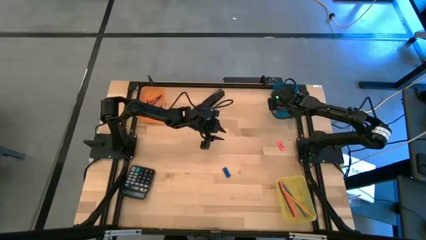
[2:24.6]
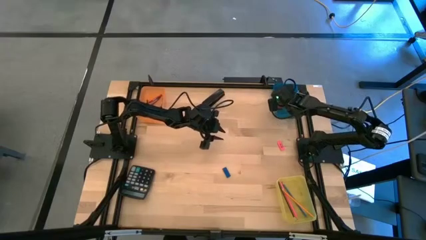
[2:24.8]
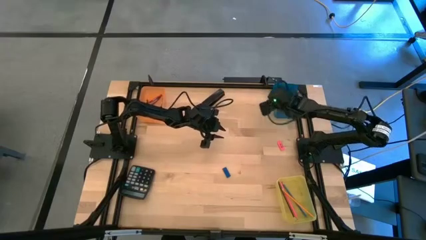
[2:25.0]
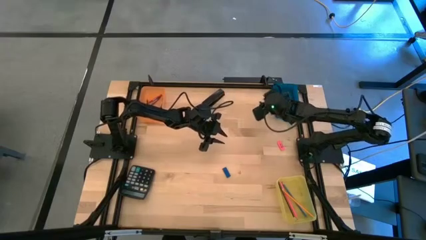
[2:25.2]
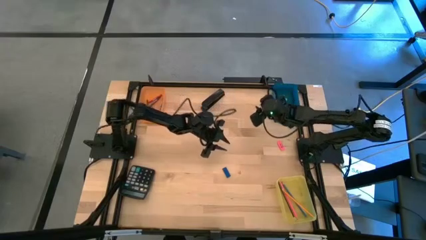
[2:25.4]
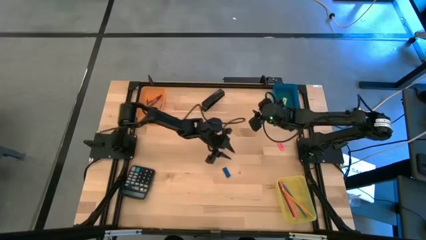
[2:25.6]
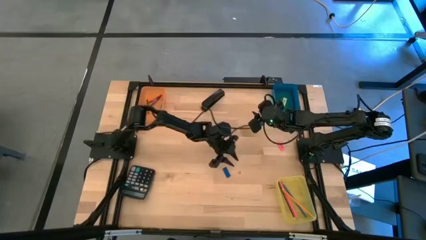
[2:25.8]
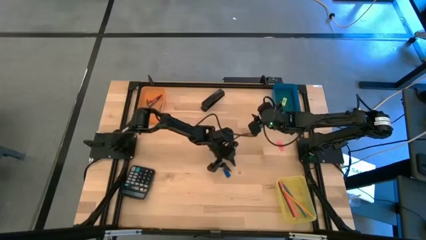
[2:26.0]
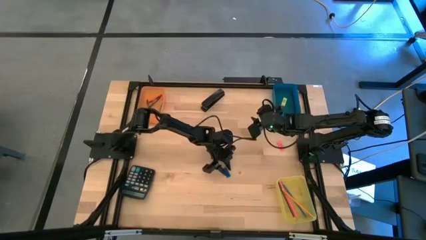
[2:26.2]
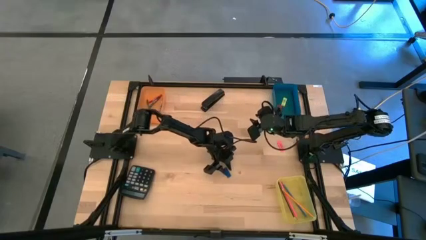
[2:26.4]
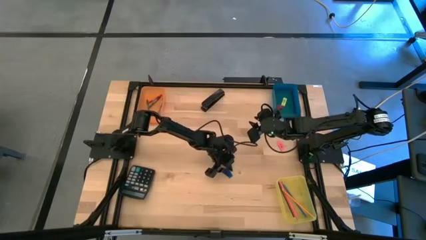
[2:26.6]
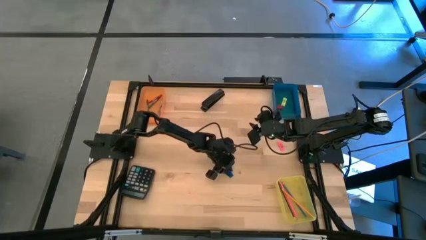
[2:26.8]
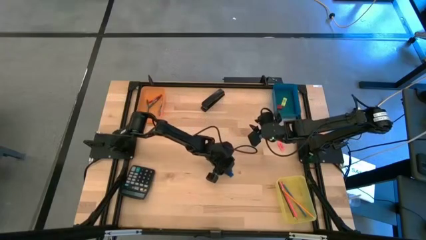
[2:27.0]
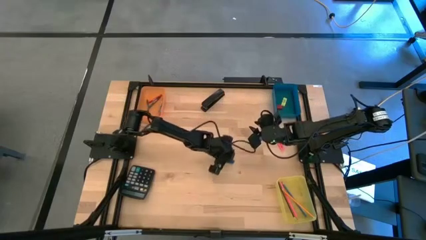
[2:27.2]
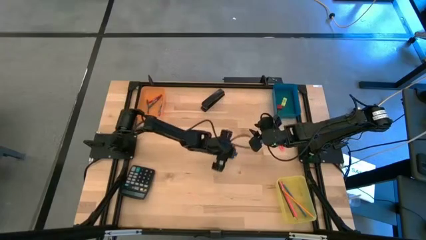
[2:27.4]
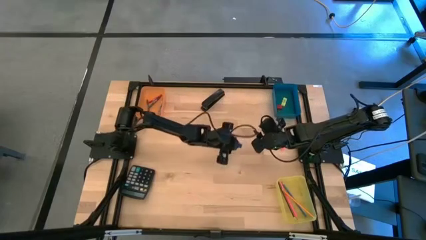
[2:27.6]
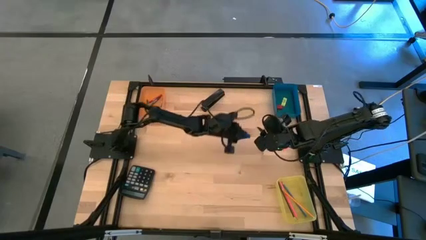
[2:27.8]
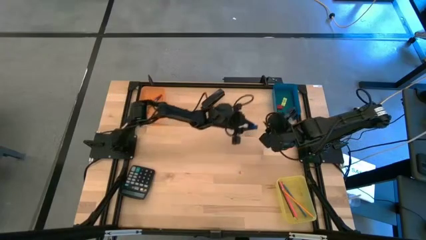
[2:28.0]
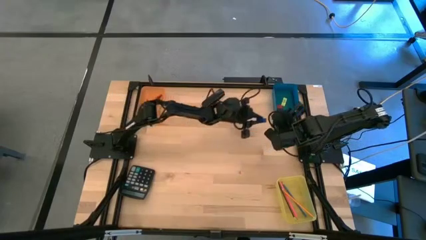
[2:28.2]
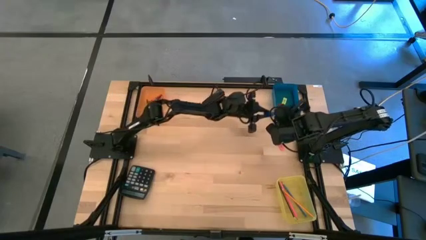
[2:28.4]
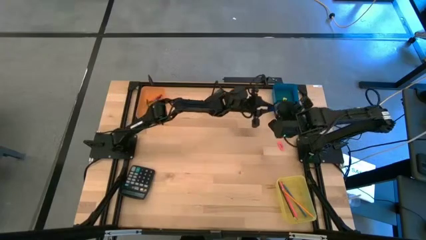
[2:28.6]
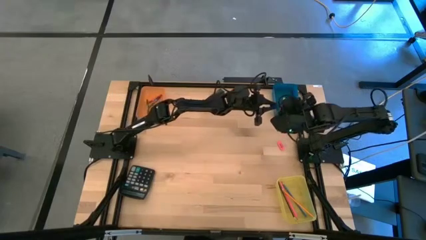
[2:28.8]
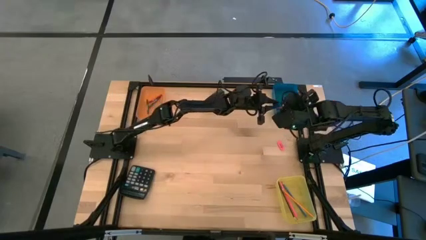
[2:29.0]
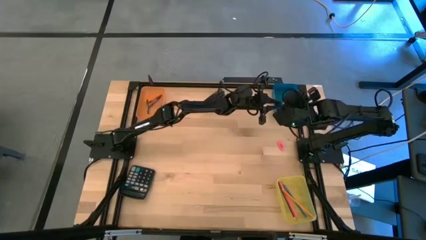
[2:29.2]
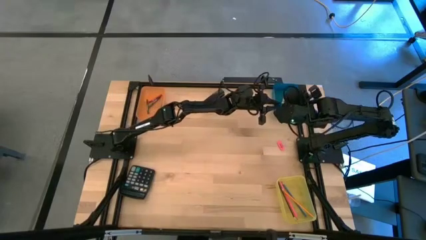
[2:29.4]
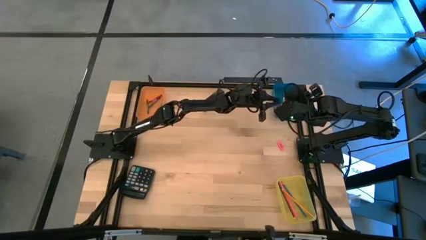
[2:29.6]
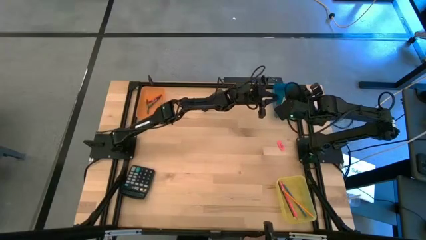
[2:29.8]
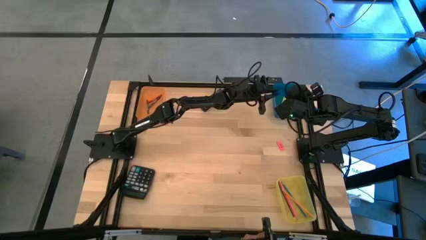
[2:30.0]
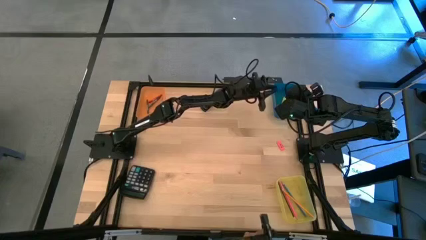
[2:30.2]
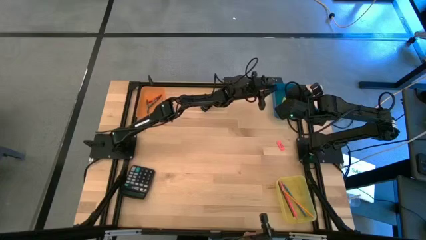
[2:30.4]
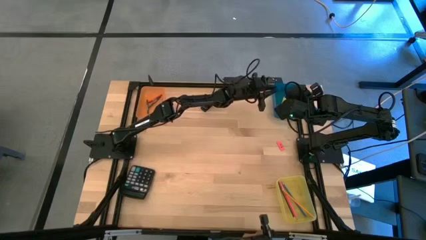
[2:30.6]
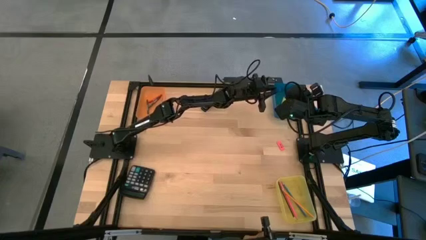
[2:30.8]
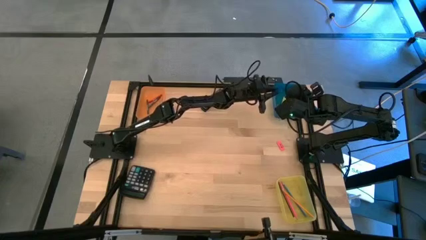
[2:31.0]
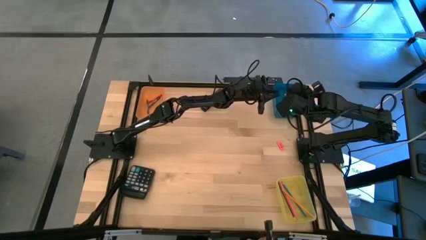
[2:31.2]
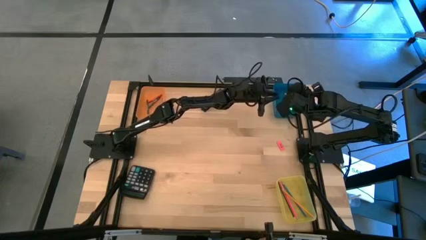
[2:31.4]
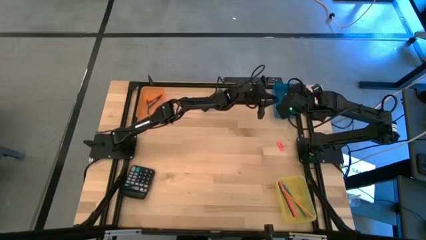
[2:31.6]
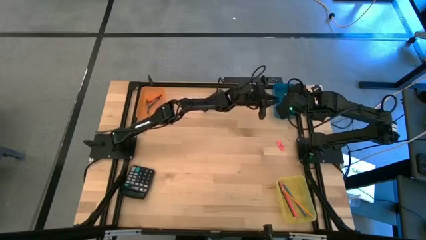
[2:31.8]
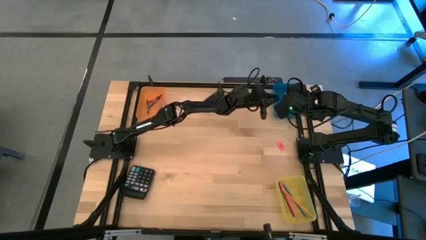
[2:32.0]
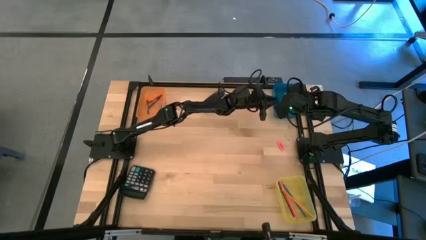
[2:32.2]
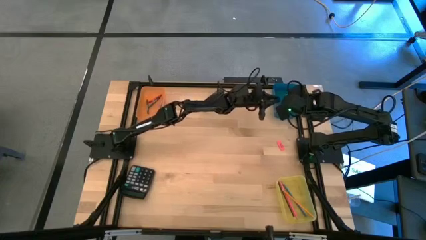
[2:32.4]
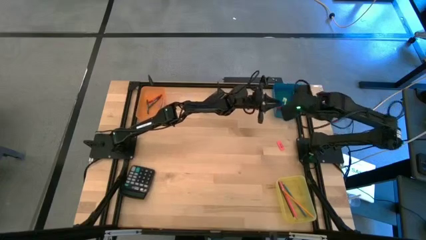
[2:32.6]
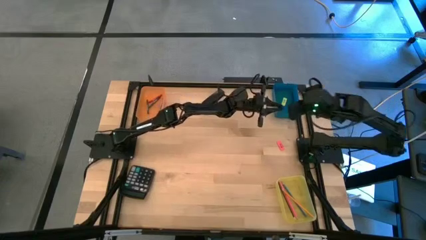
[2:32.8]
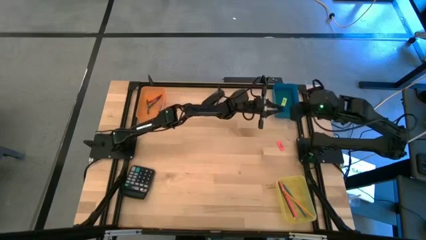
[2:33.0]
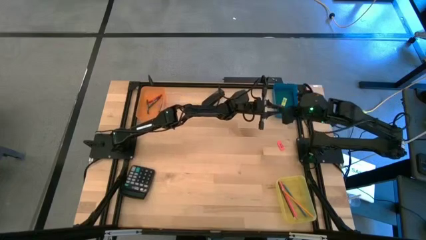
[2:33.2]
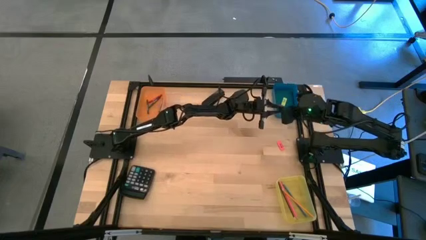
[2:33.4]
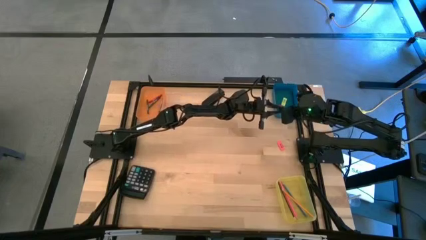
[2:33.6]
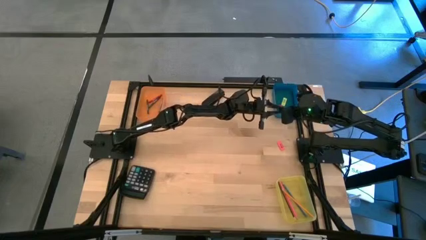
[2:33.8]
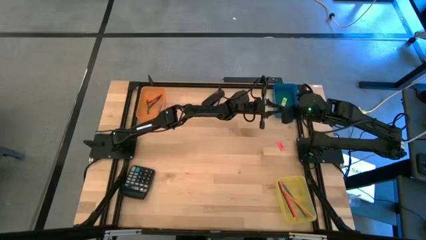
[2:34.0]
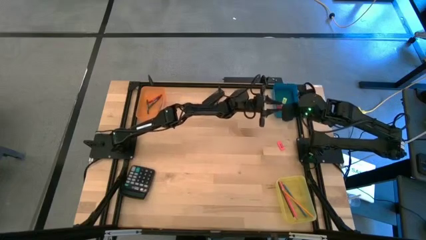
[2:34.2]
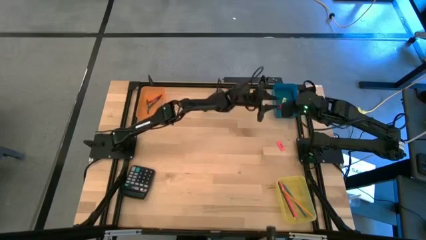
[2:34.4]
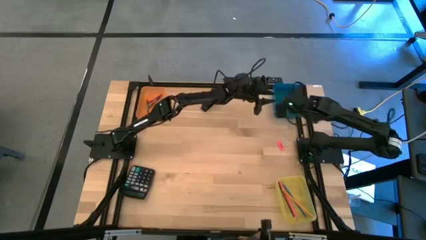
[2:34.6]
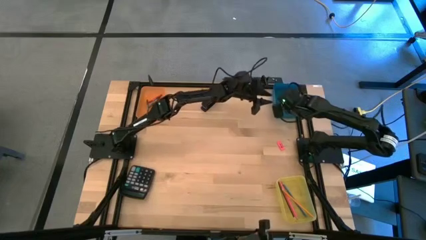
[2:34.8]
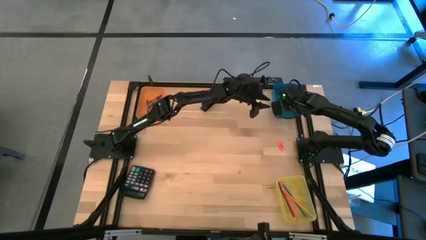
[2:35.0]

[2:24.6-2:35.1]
Task: Sort crayons/erasers/pens/pencils in bins
Put the blue eraser into the blue bin

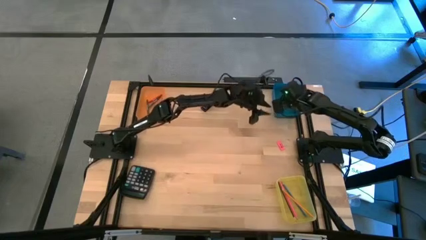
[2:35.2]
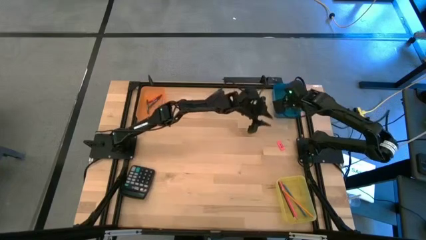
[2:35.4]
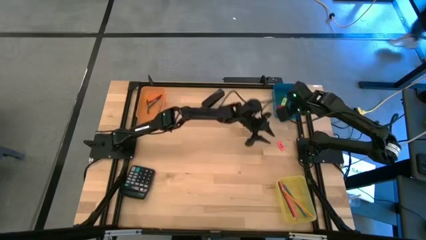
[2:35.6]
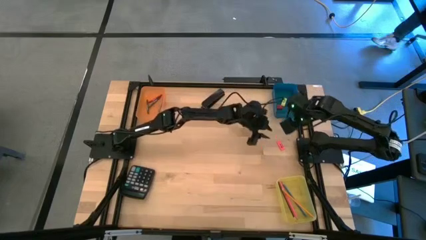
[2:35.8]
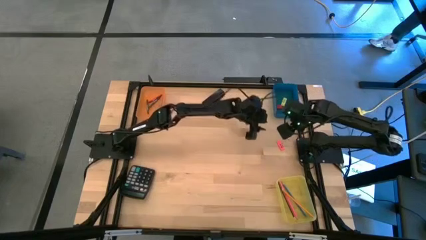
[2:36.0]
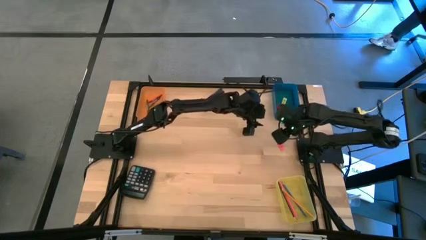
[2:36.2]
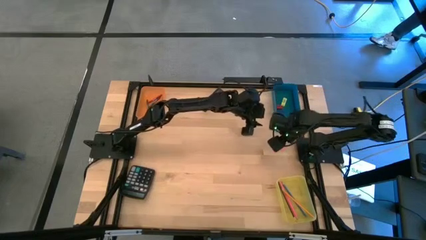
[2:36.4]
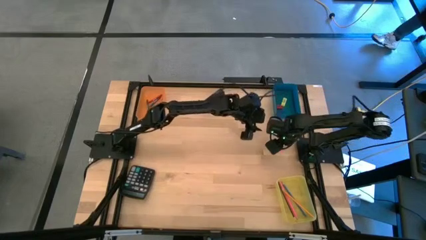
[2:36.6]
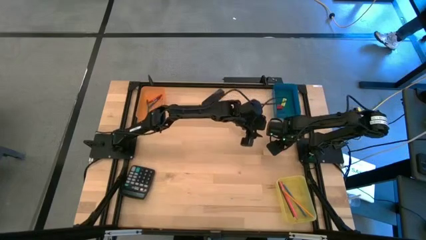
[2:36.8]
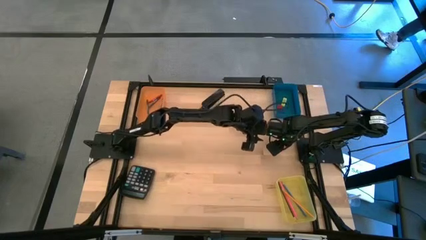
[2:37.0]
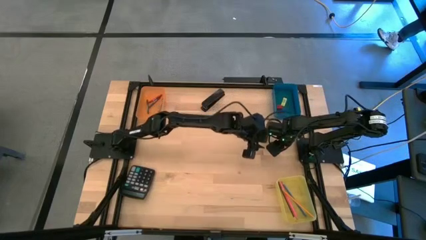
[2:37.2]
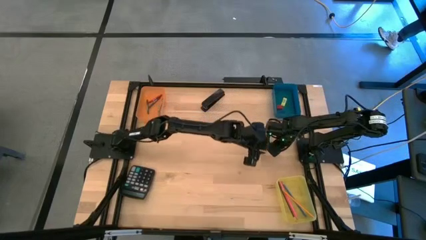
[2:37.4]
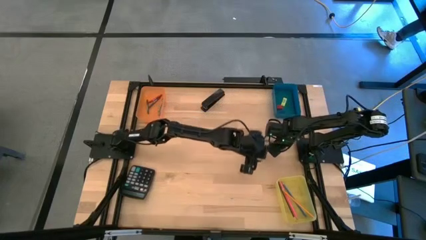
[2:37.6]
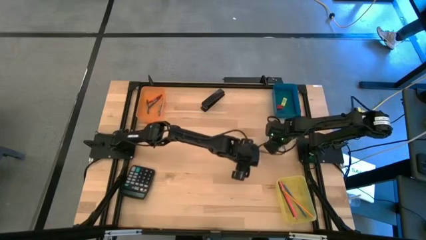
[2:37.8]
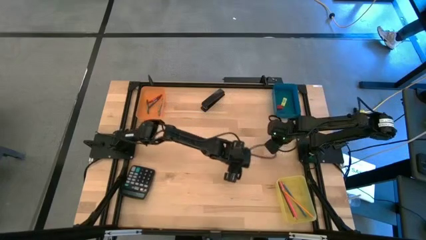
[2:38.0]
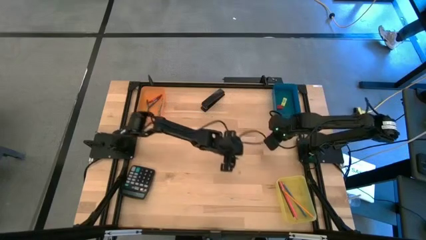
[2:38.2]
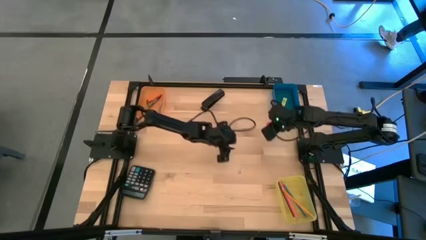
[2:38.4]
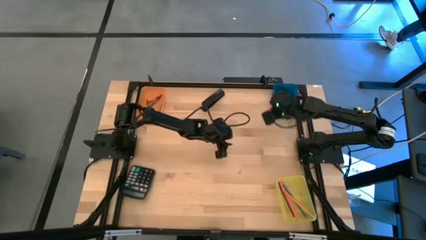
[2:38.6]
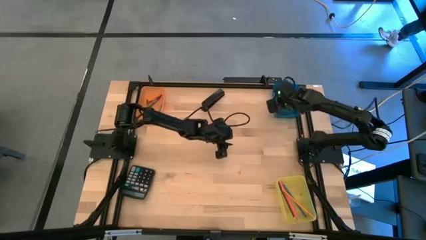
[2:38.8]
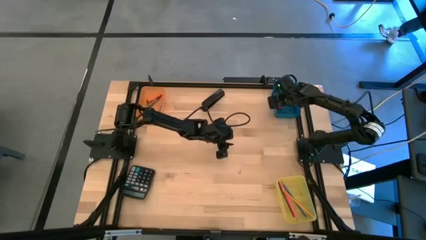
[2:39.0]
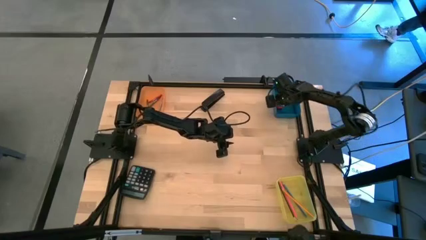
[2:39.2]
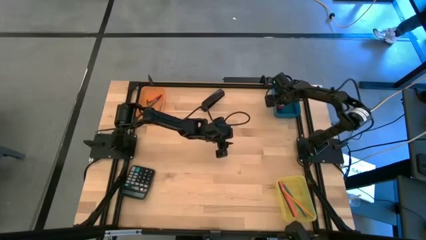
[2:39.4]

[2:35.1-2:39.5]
Put the pink eraser into the blue bin

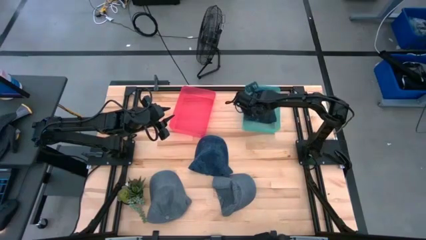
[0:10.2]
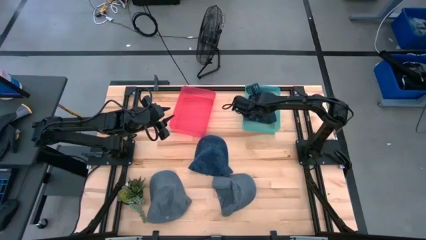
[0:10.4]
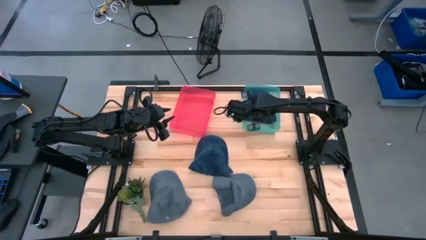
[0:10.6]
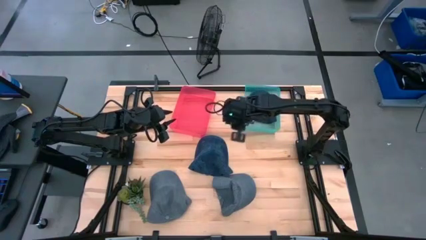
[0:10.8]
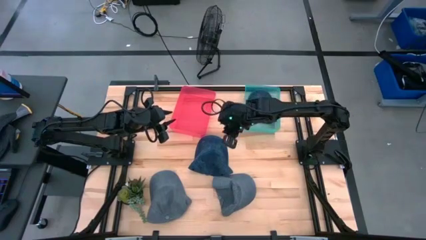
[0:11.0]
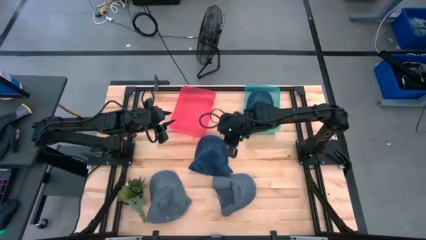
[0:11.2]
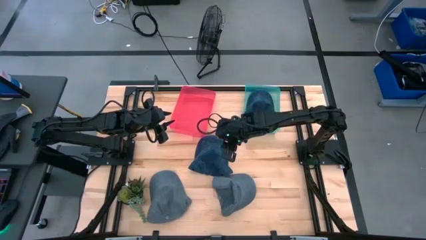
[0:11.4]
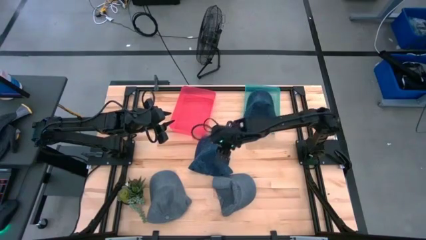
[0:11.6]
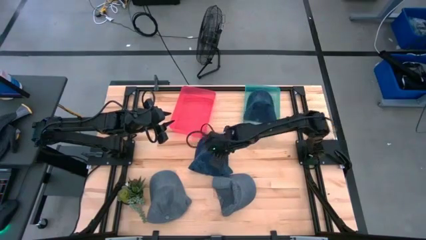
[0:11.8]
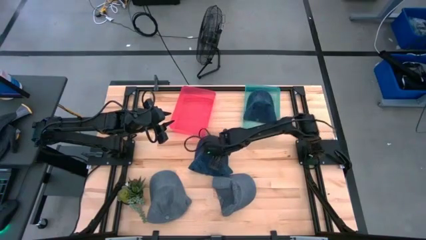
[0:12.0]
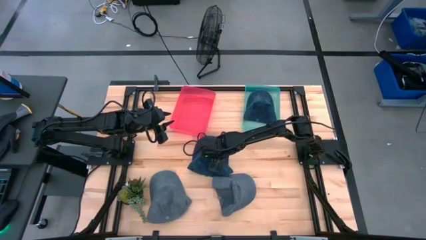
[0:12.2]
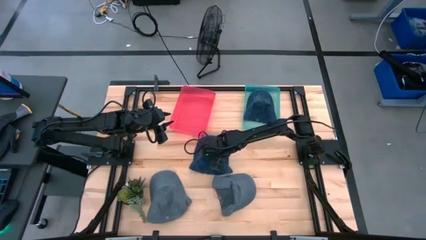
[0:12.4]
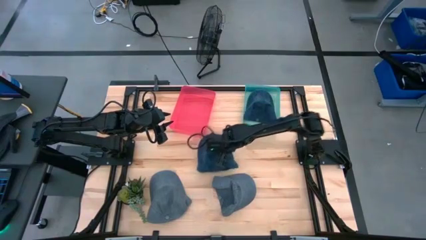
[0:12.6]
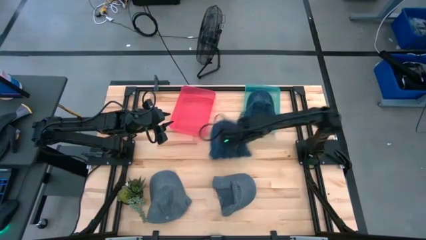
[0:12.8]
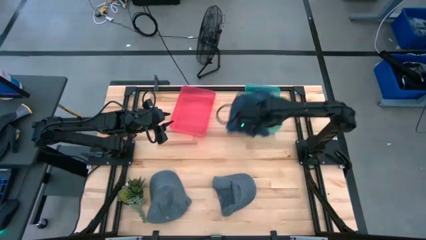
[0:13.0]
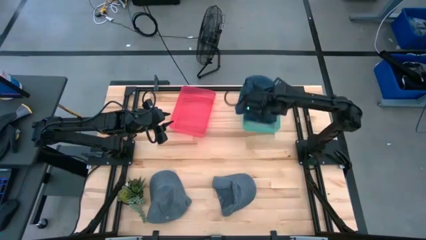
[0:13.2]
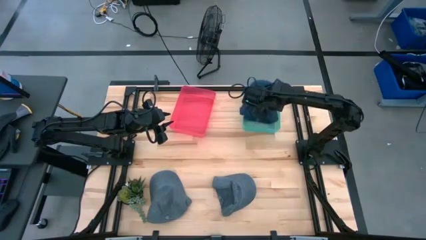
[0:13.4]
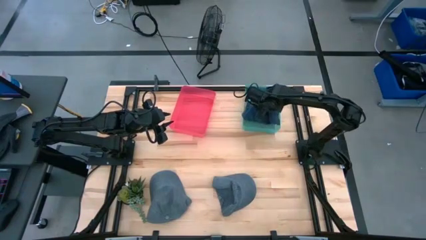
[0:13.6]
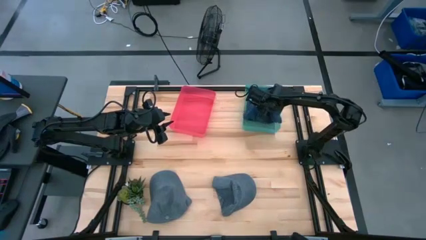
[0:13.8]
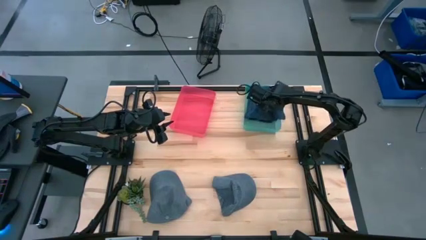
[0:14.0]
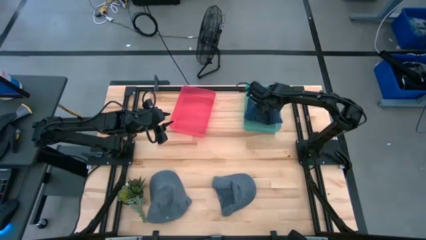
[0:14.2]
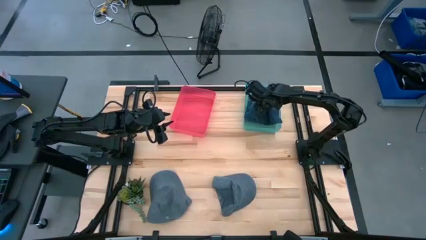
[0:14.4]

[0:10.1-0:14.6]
Task: Pick & Place hat
Put the blue cap into the blue bin
